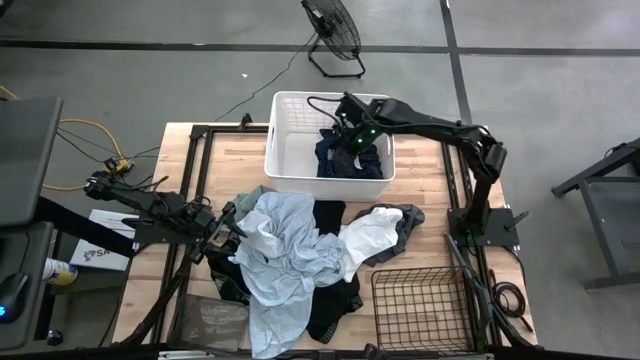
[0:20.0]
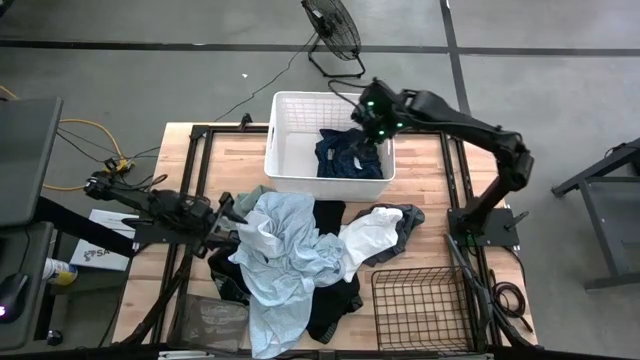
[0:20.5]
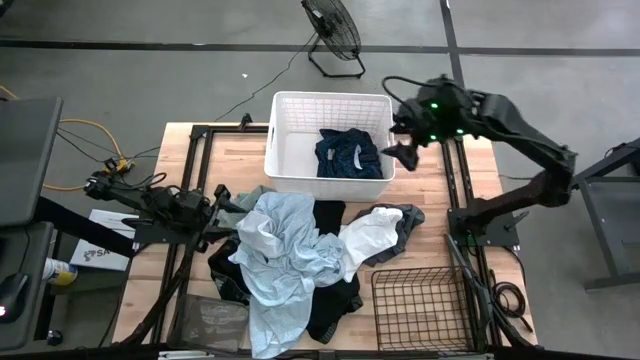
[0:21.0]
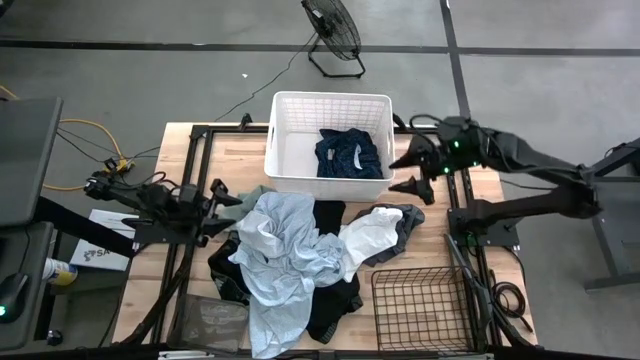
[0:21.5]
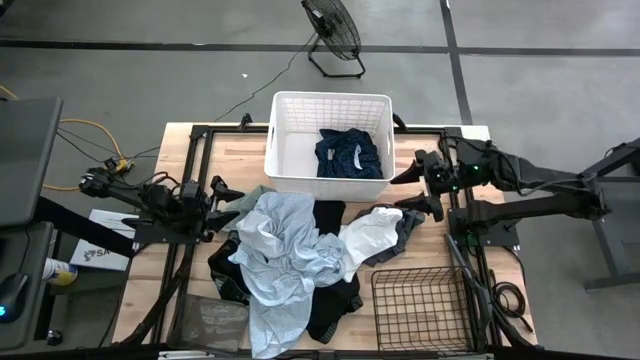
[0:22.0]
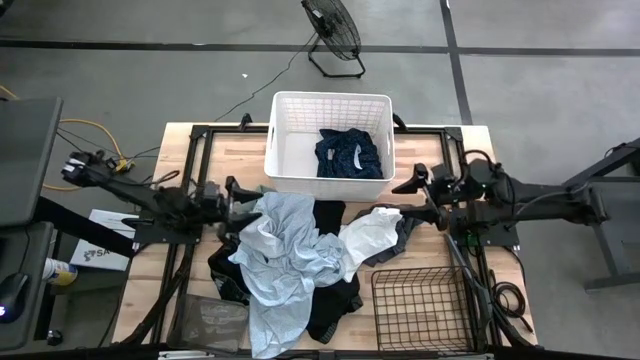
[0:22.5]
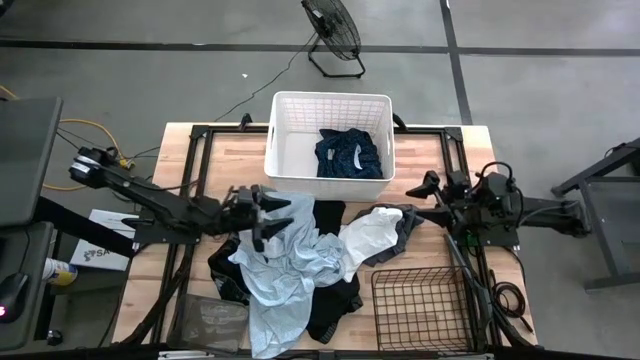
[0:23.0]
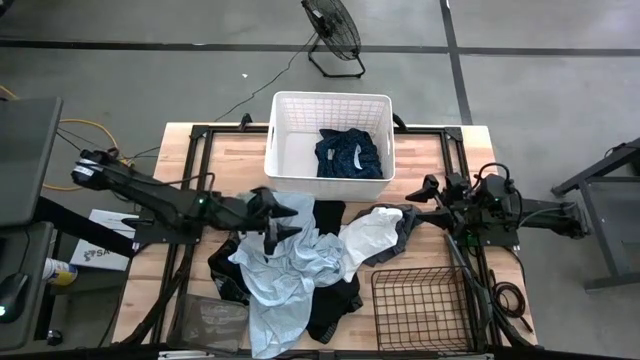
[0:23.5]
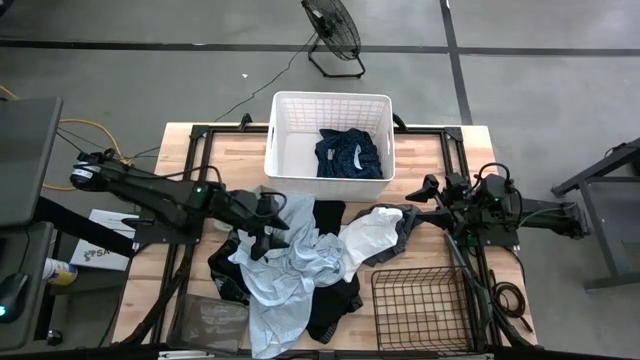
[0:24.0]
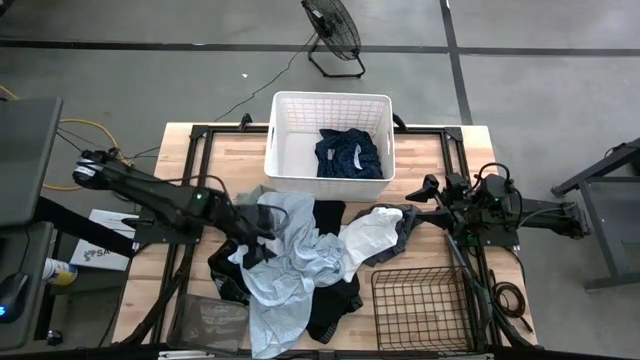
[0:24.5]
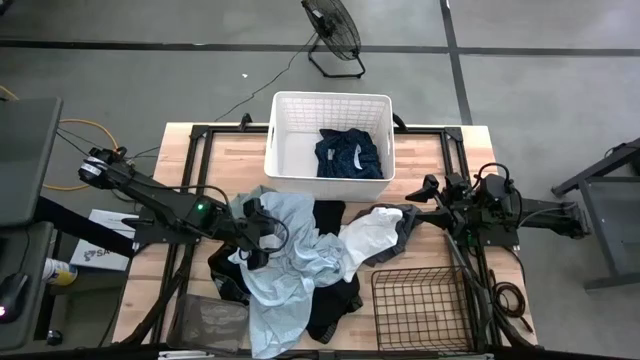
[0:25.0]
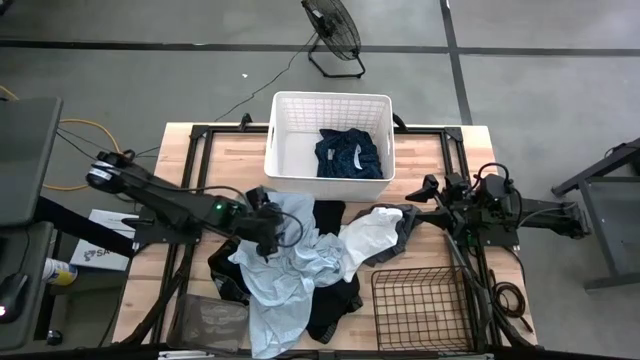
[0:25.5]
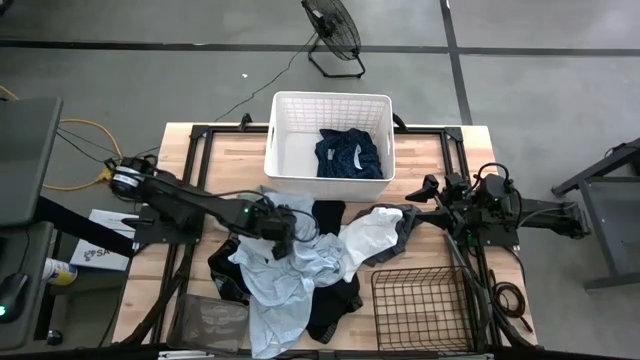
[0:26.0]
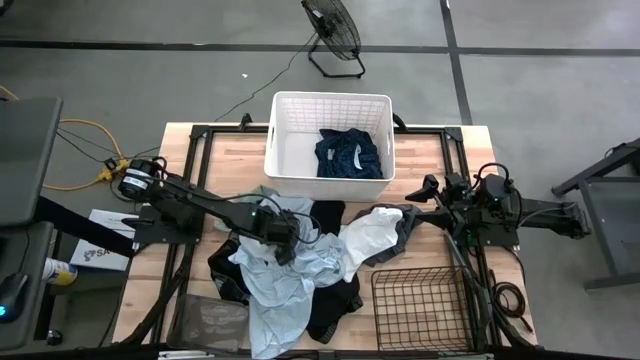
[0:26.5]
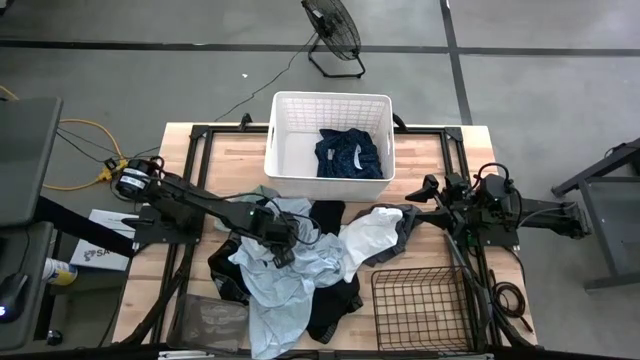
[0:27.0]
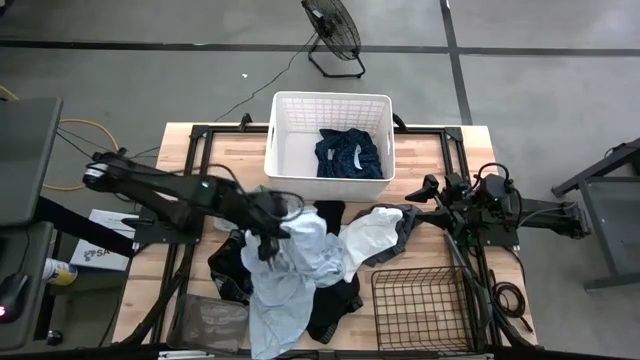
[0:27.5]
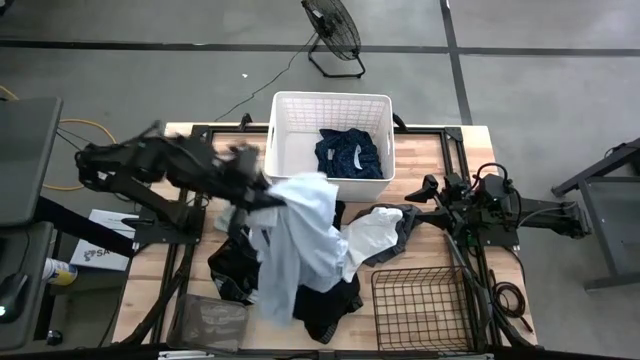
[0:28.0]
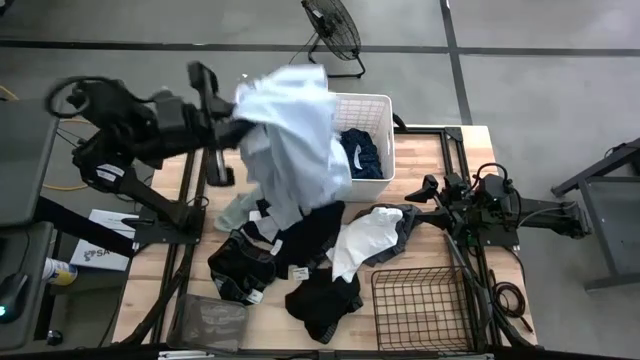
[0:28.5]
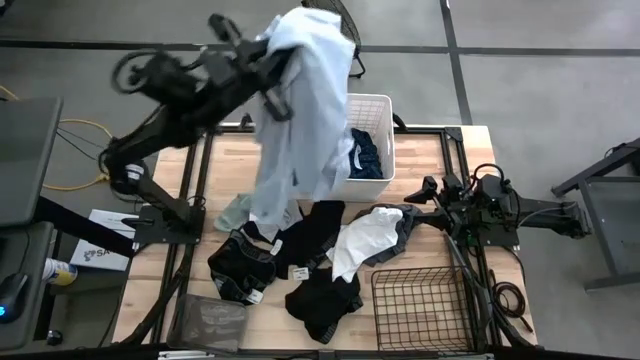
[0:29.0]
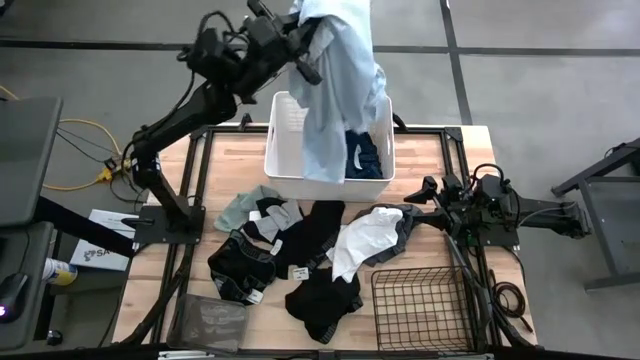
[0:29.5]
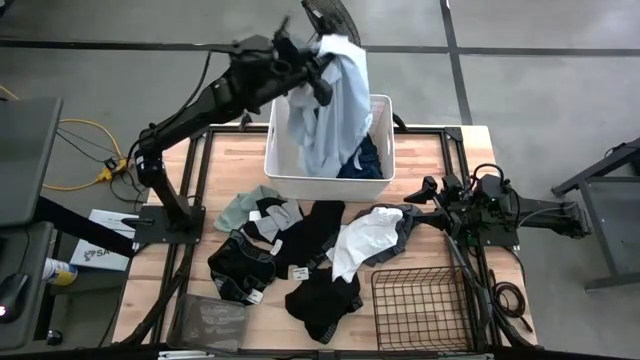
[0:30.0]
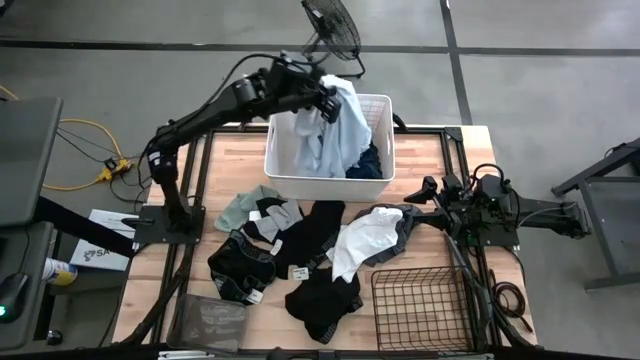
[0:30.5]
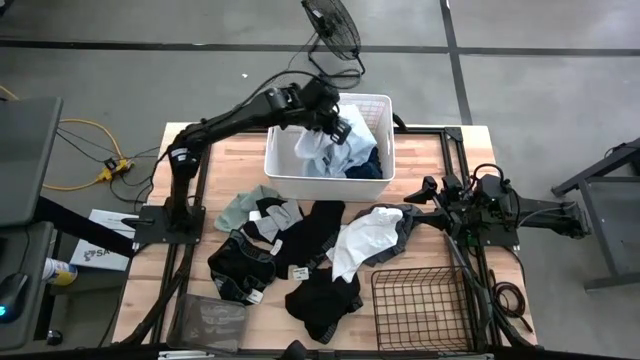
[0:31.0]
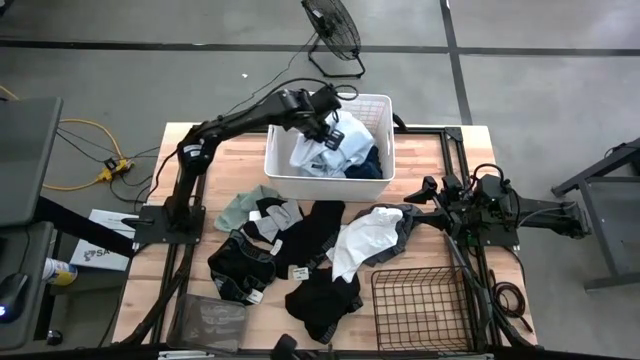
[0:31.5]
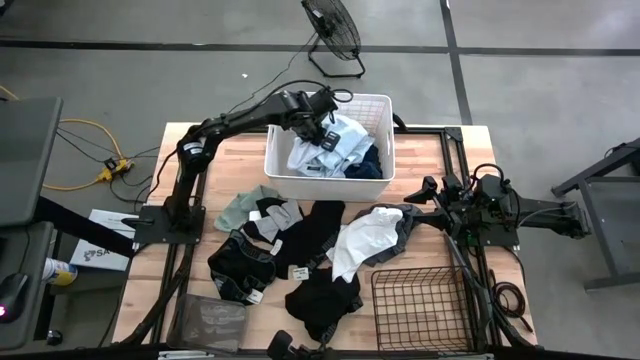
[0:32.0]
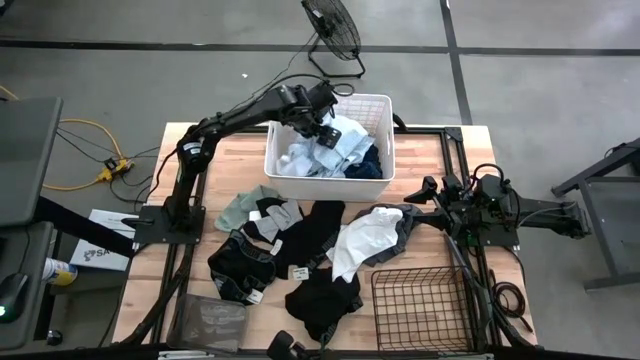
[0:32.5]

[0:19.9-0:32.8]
Task: Pick & Place Cloths
Put the white polo shirt into the white laundry bin

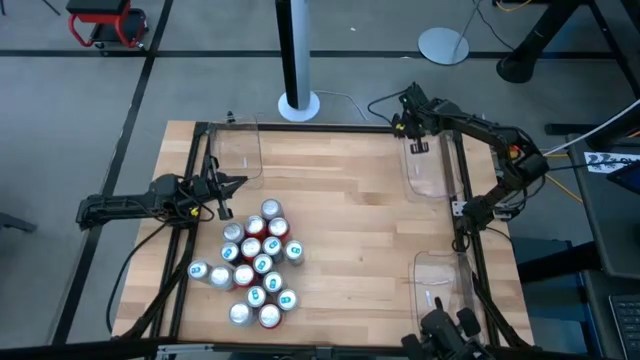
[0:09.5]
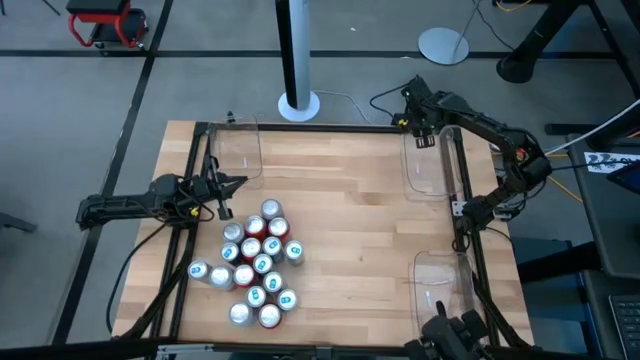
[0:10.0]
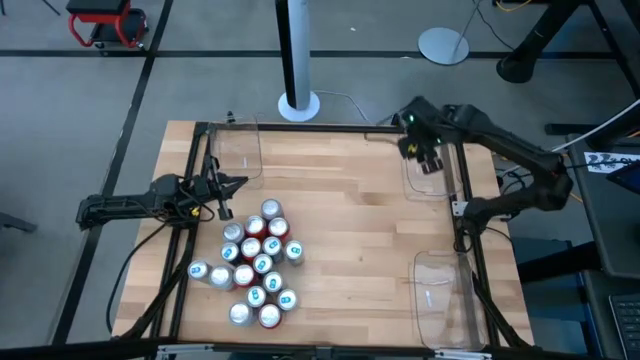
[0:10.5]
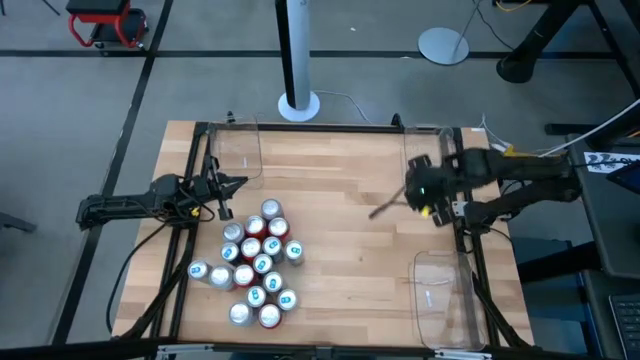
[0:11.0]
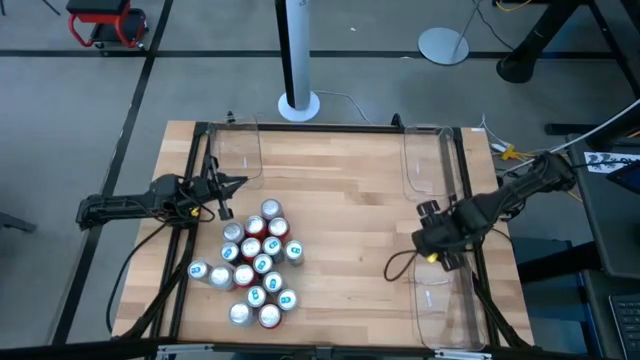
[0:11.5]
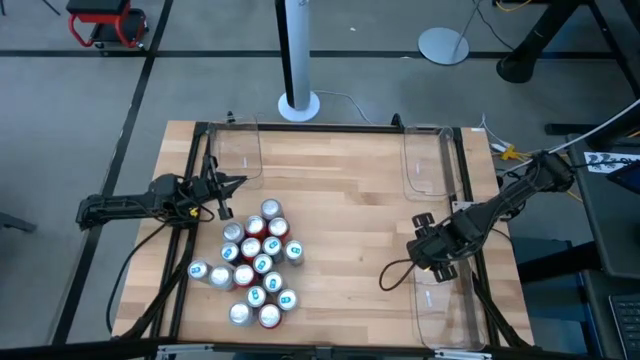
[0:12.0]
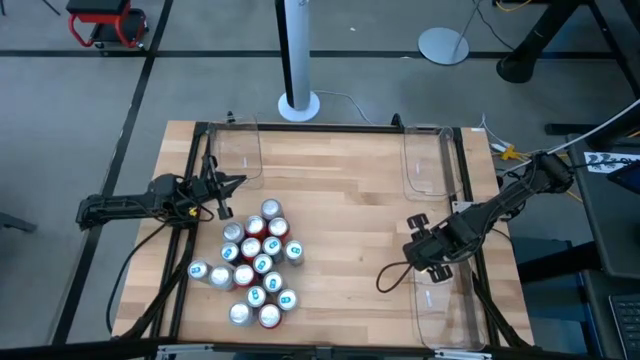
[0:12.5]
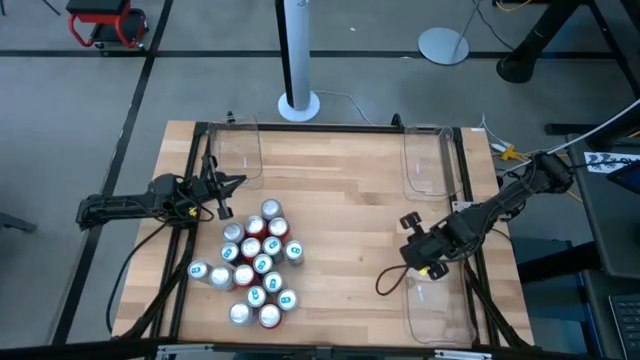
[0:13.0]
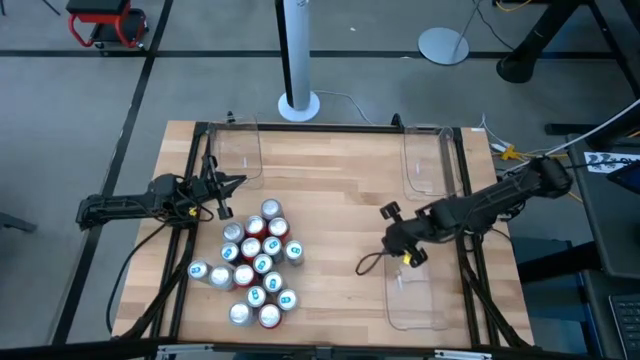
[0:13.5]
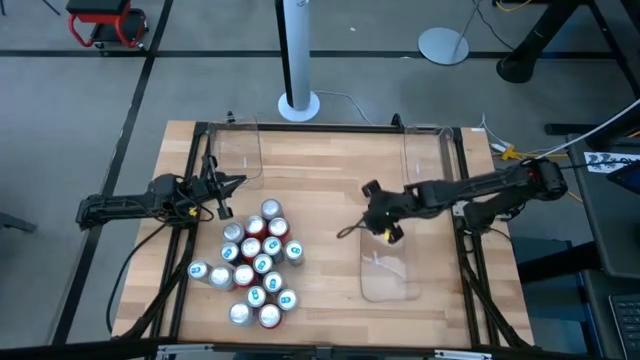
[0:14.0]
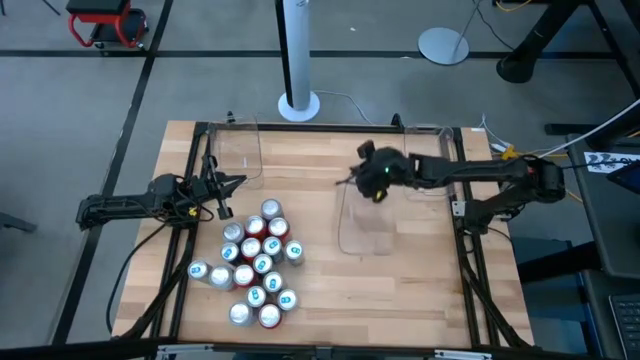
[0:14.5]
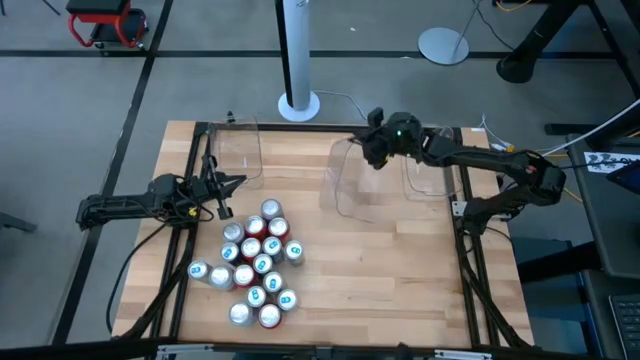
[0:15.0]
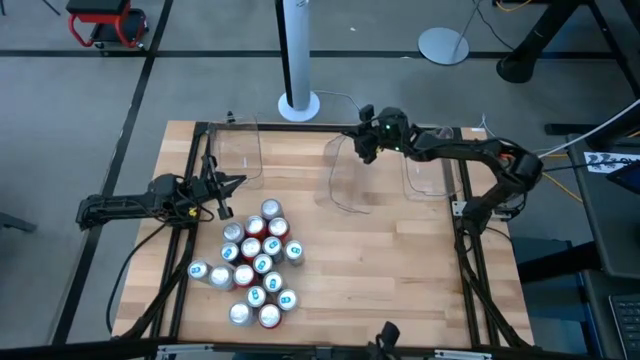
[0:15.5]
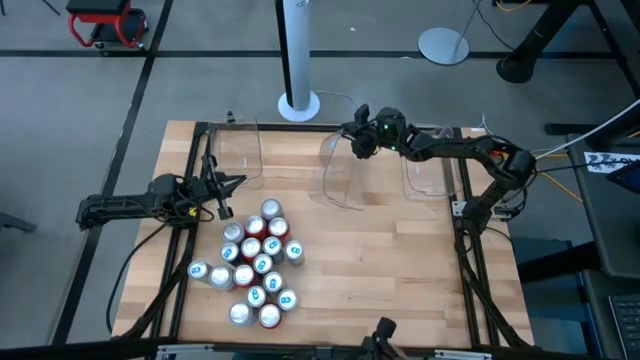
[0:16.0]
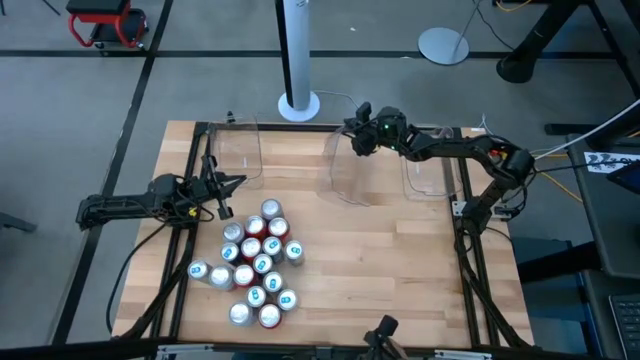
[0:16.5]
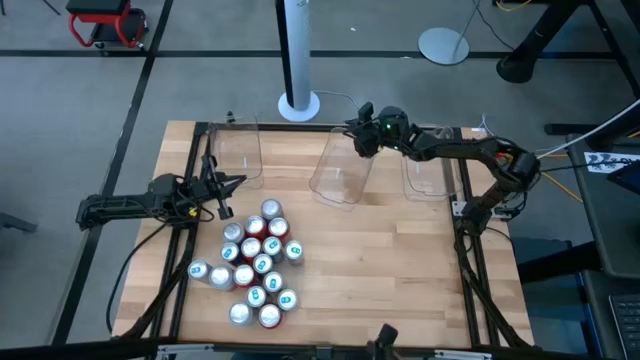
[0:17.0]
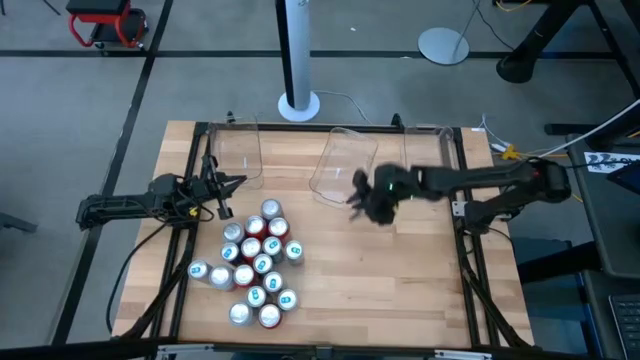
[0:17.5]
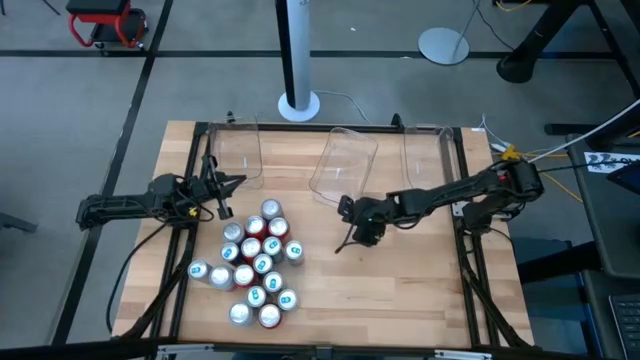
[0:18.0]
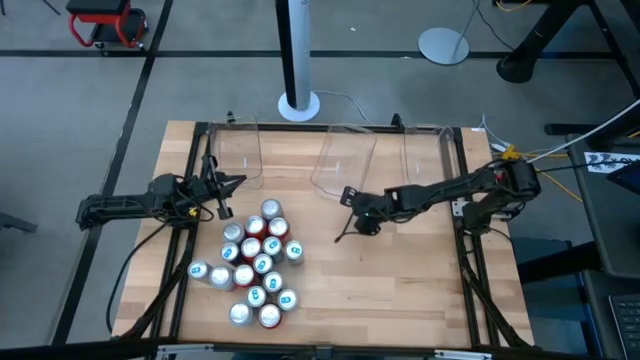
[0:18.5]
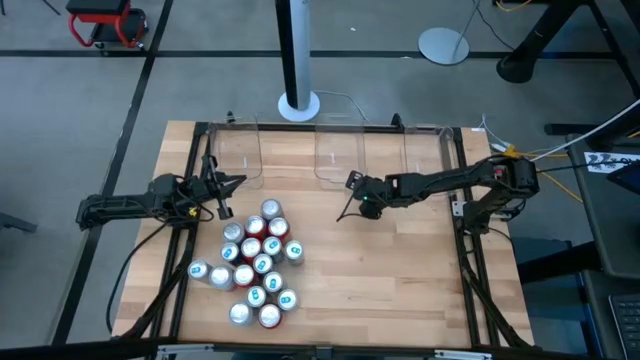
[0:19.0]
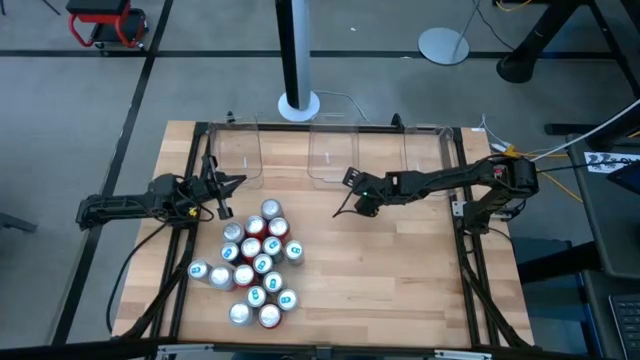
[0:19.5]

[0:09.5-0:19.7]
Task: Sort soda cans
Move the transparent bin from the bottom right to the top center on the table
